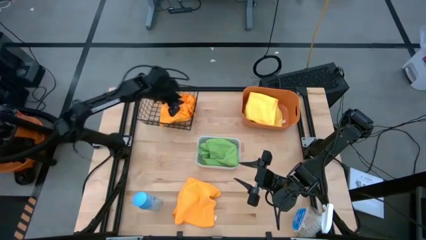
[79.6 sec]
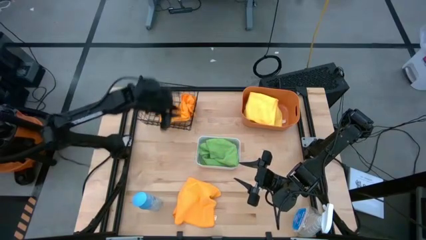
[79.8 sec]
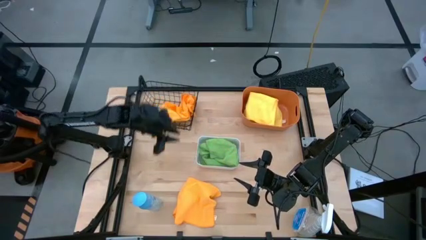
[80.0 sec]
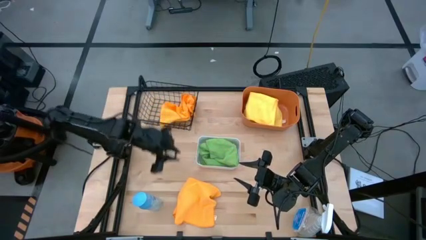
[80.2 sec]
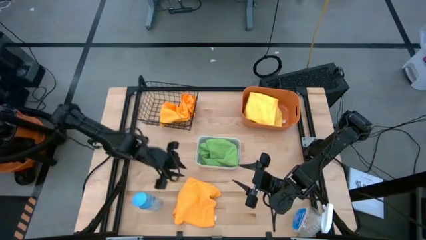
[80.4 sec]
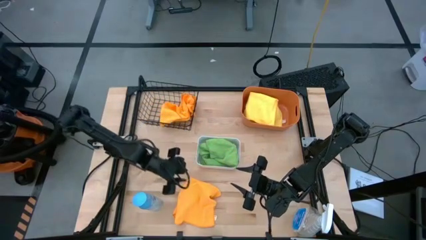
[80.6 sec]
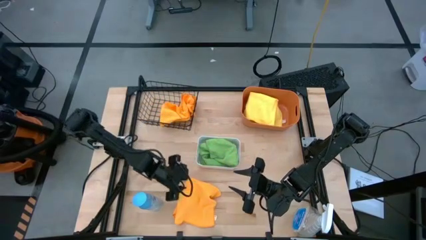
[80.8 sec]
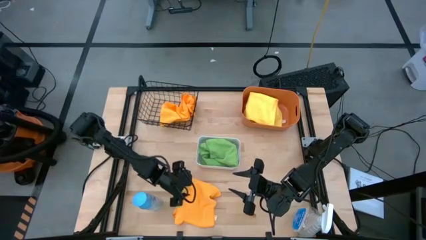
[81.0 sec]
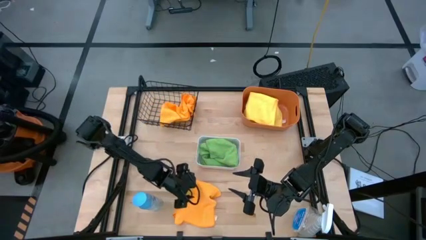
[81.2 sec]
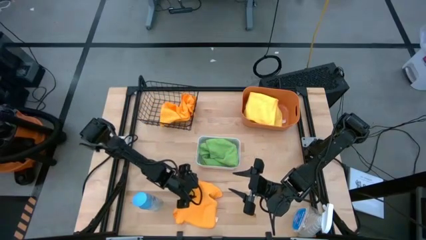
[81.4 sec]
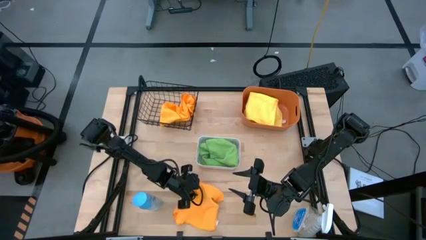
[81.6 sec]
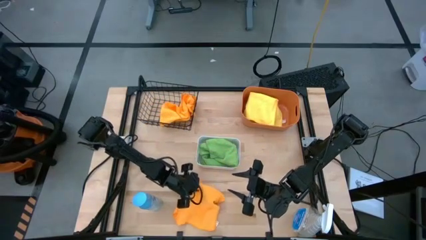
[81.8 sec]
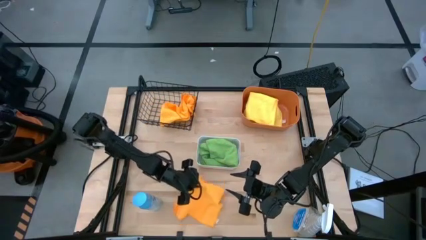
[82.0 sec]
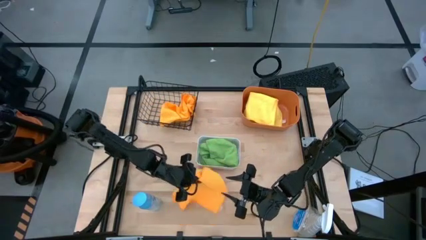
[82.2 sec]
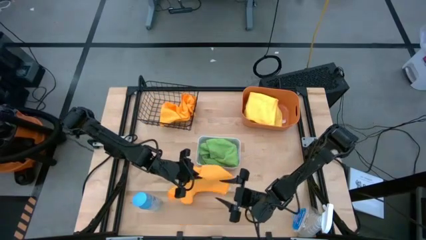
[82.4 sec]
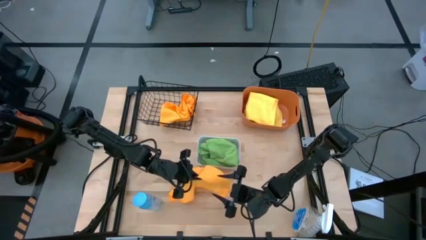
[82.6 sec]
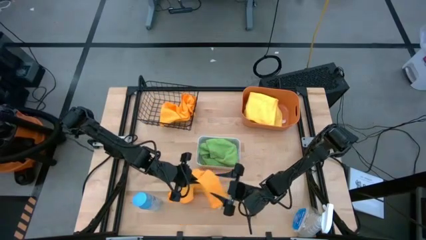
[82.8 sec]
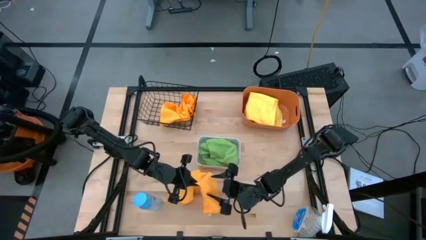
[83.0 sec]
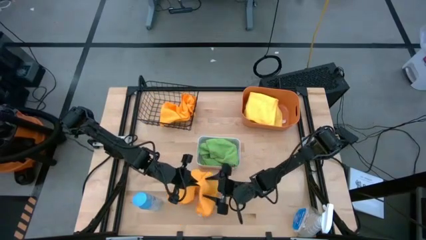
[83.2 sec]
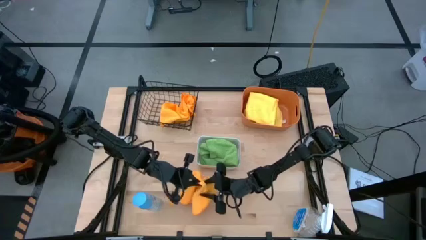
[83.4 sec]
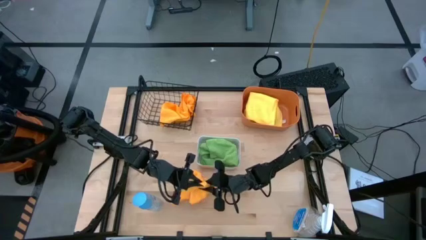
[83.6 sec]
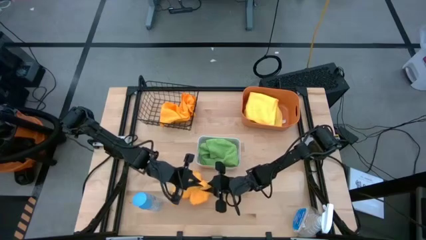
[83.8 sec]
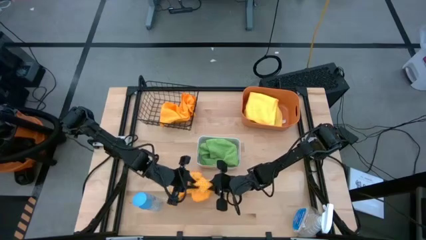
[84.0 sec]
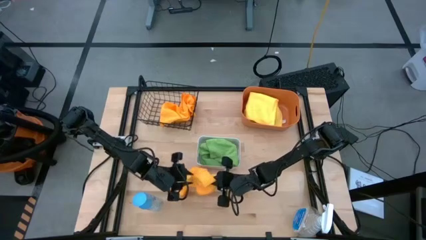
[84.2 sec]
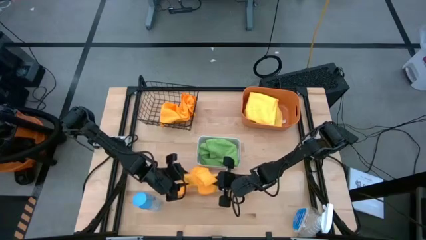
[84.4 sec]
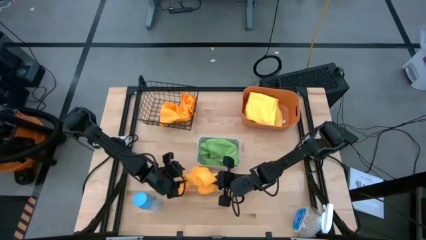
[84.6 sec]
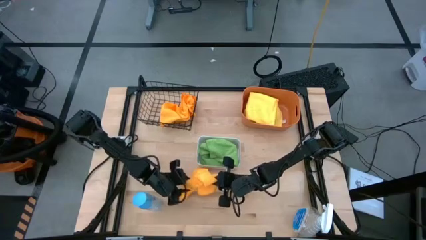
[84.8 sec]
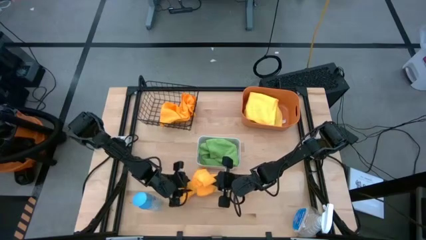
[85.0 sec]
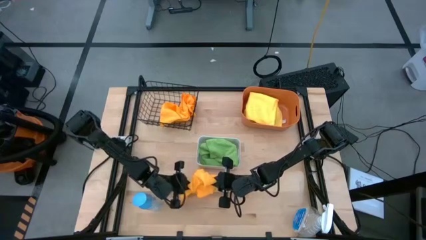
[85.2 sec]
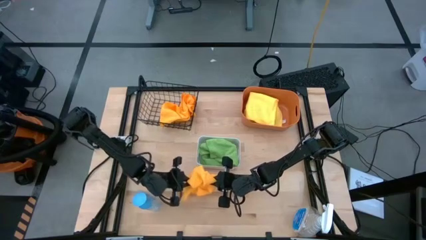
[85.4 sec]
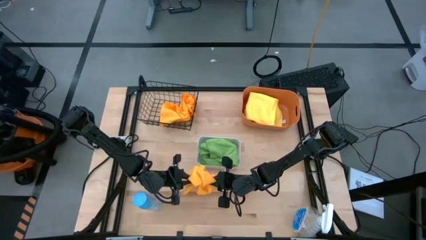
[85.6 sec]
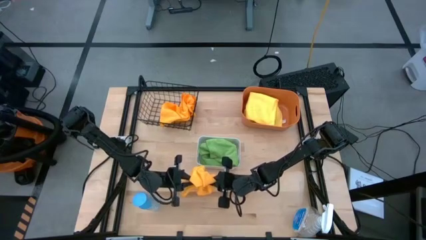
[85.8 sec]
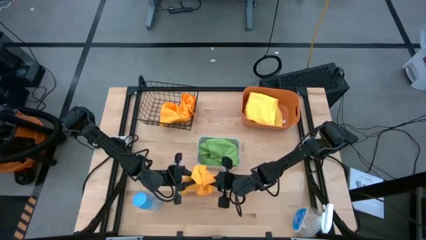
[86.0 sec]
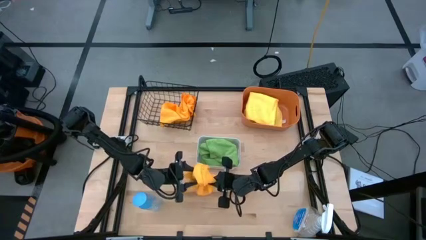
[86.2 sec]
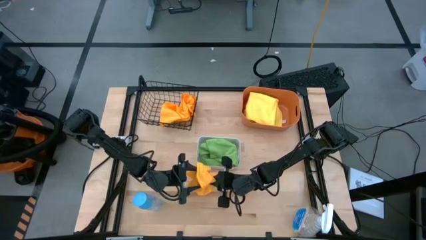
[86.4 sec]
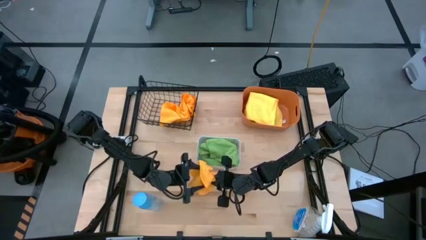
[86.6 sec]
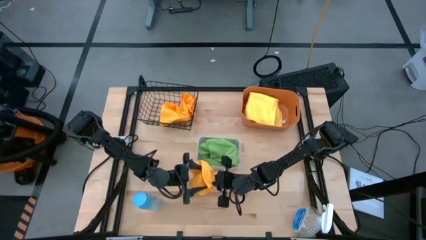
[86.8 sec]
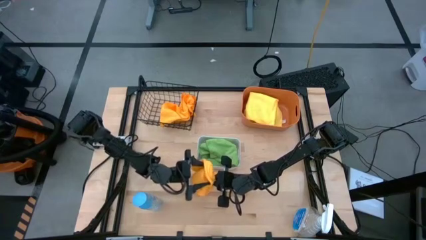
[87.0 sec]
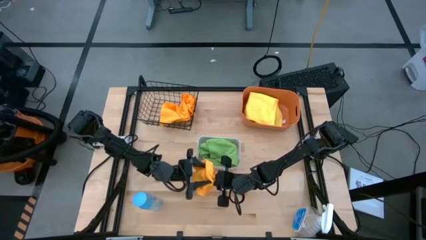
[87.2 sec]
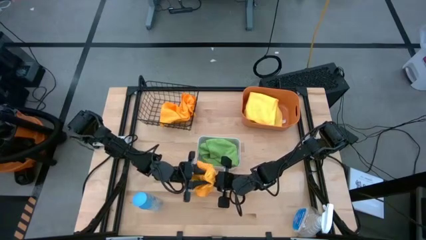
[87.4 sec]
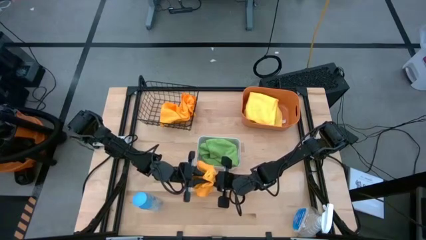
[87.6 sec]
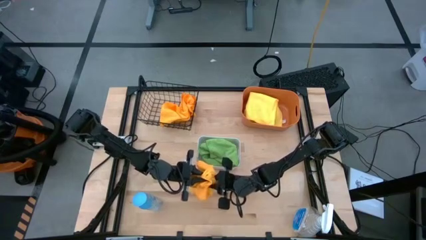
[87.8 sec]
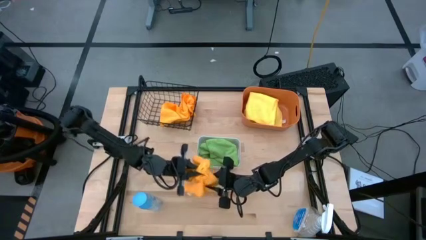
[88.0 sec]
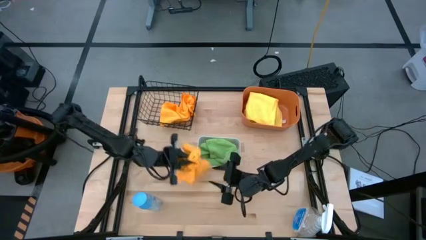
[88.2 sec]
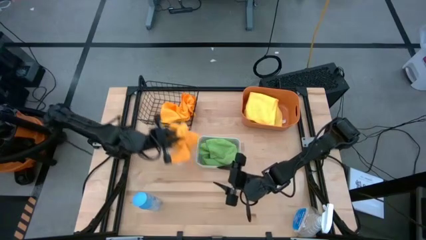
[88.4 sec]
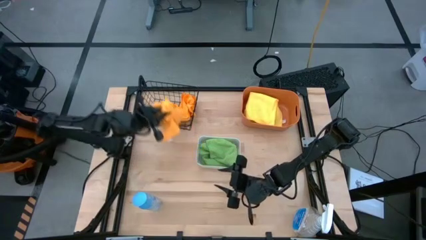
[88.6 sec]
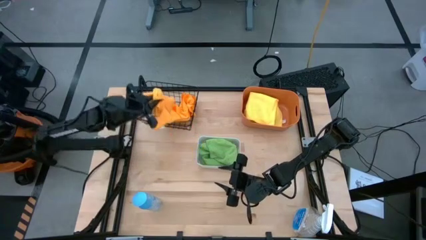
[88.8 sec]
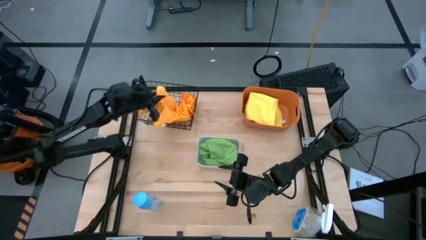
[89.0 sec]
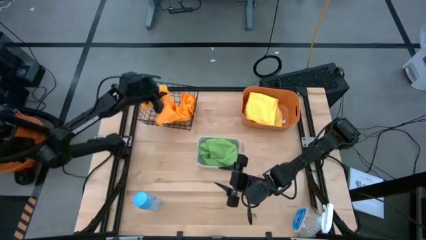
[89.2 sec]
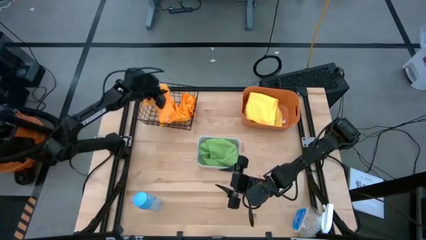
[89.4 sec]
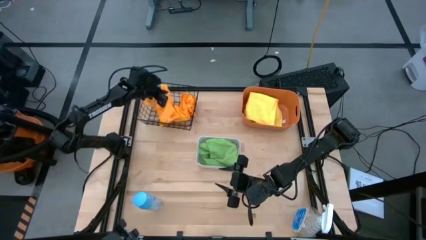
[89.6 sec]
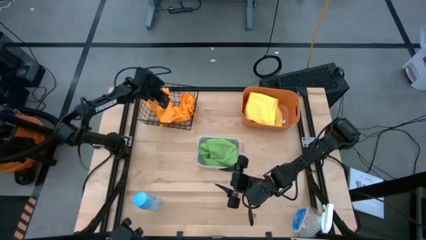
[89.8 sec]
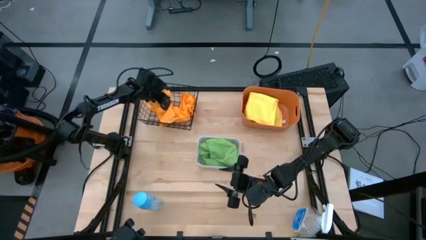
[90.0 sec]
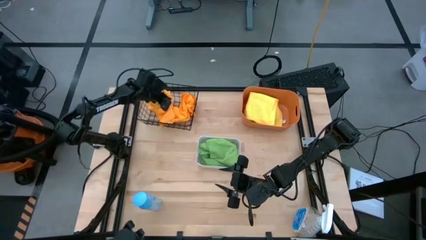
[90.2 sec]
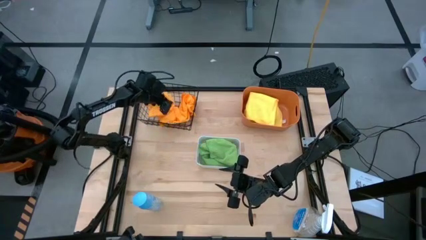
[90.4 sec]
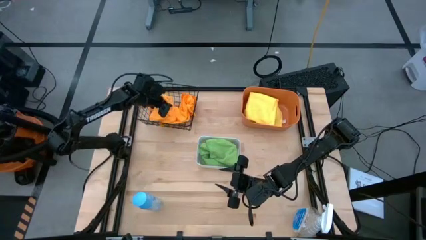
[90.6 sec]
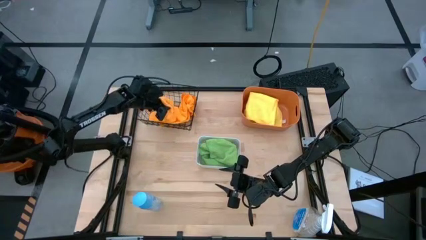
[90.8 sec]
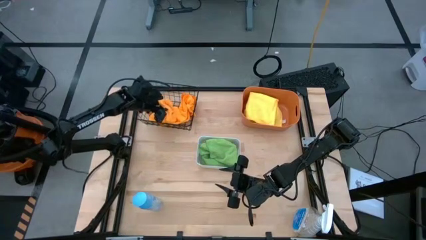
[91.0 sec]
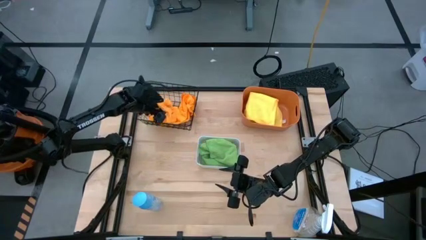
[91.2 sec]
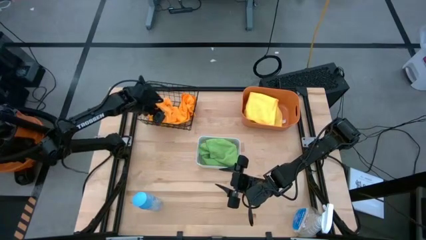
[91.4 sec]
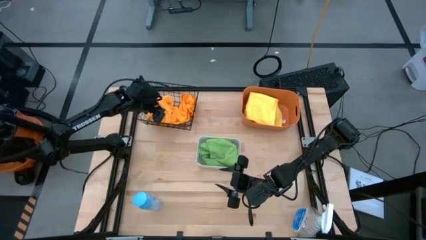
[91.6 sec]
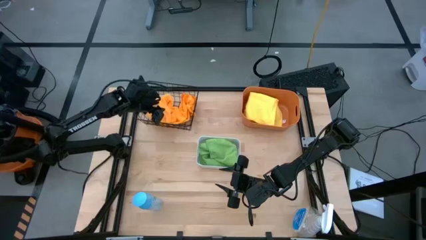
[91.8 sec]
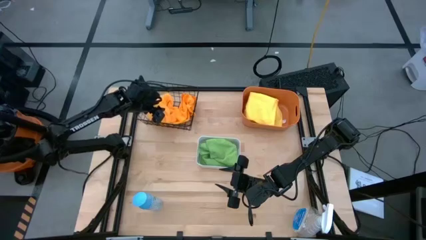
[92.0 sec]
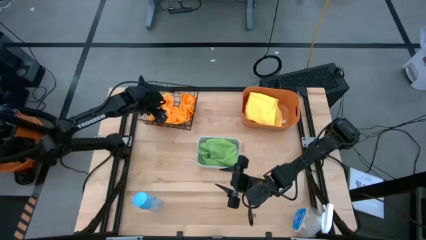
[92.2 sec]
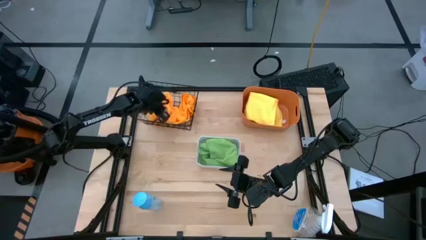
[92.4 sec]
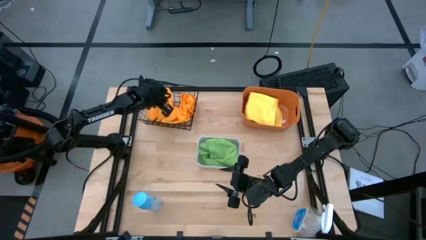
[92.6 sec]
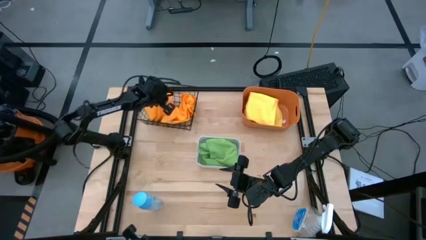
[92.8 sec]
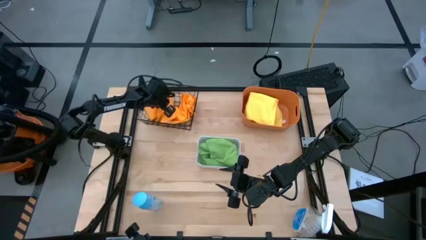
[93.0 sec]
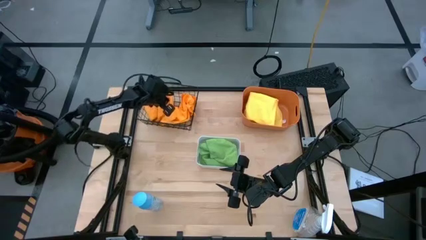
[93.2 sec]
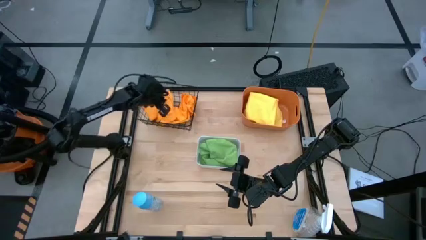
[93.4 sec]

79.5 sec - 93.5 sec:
Task: Sort microfiber towel by color & place in baskets
Put the orange microfiber cloth into the black wired basket
